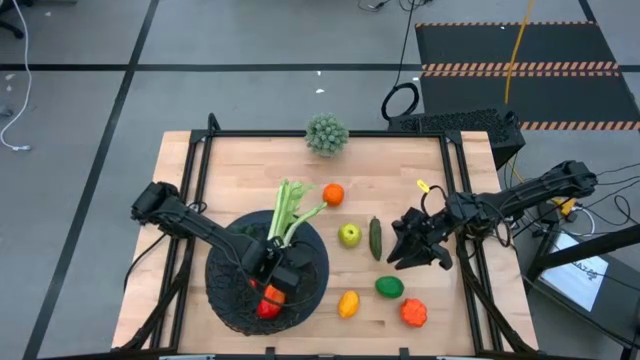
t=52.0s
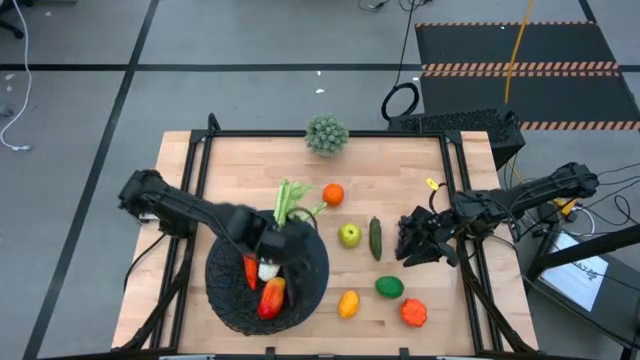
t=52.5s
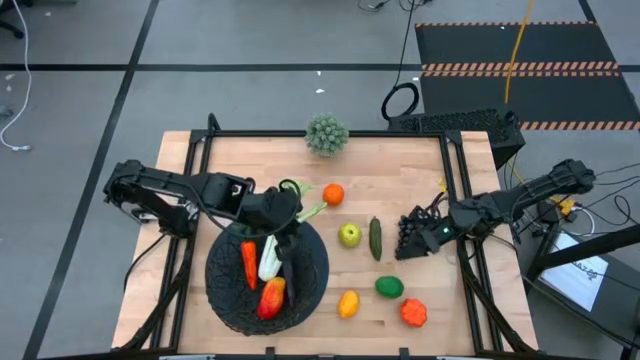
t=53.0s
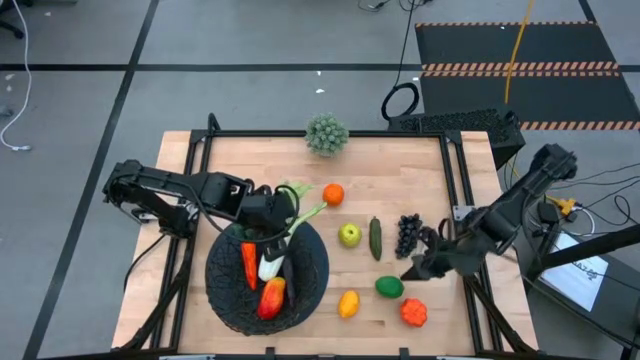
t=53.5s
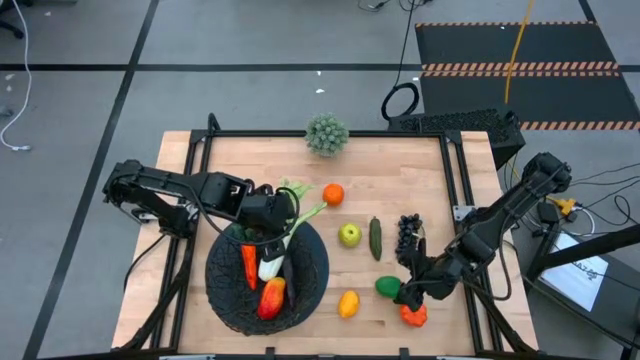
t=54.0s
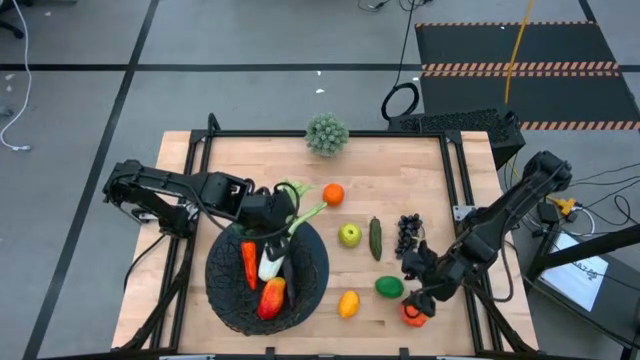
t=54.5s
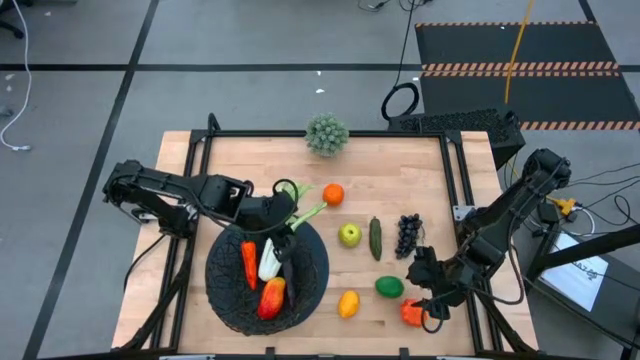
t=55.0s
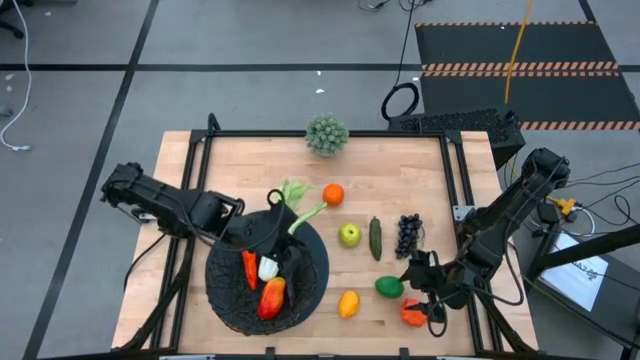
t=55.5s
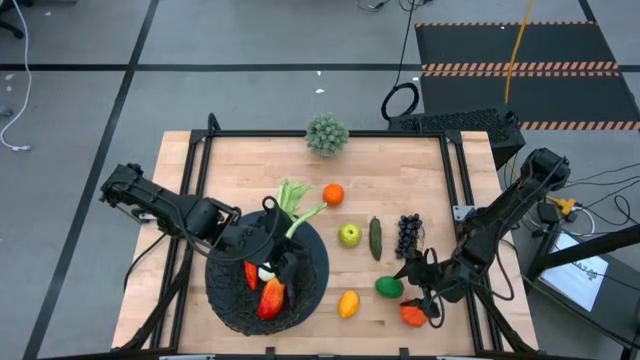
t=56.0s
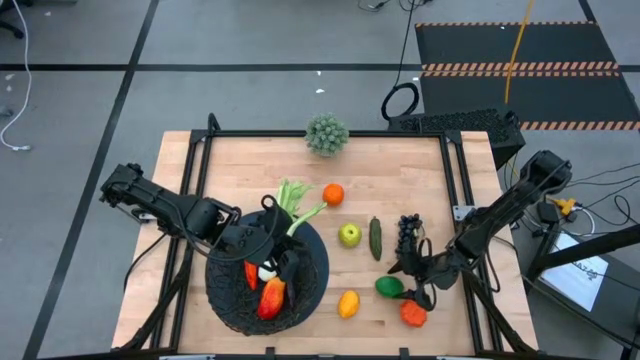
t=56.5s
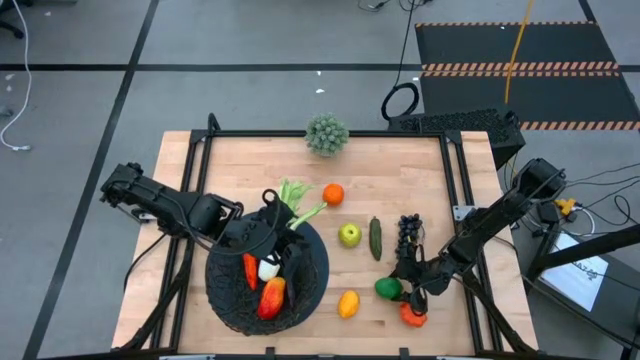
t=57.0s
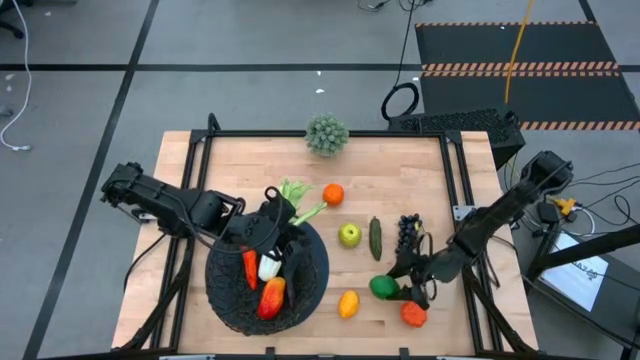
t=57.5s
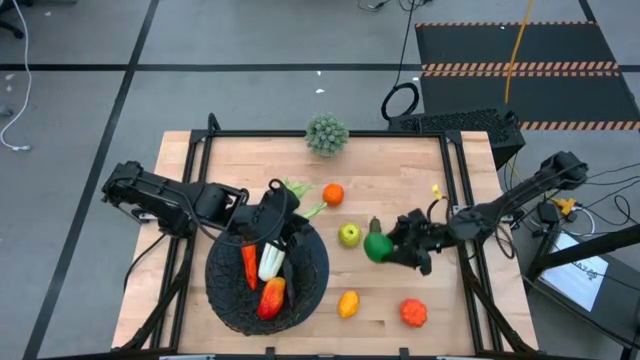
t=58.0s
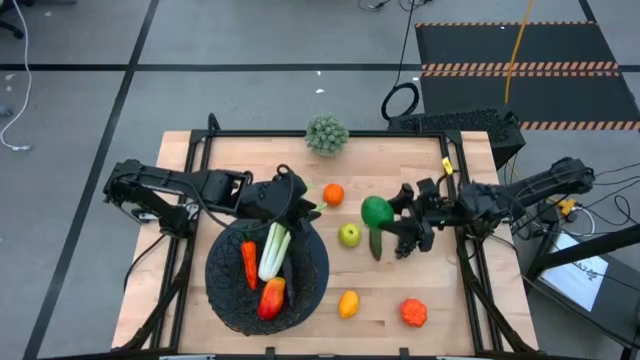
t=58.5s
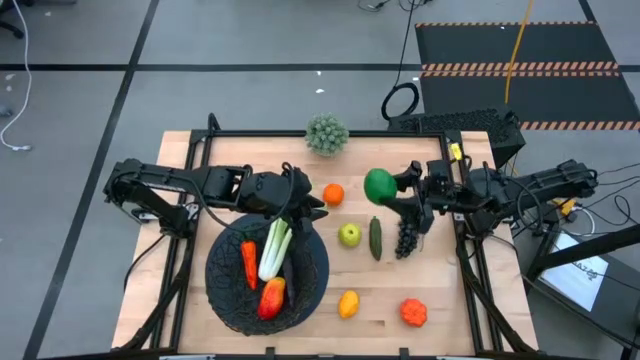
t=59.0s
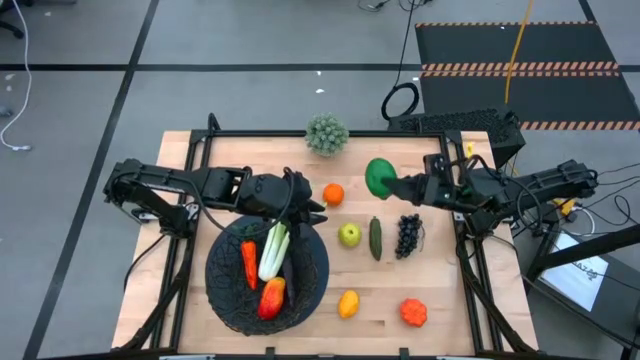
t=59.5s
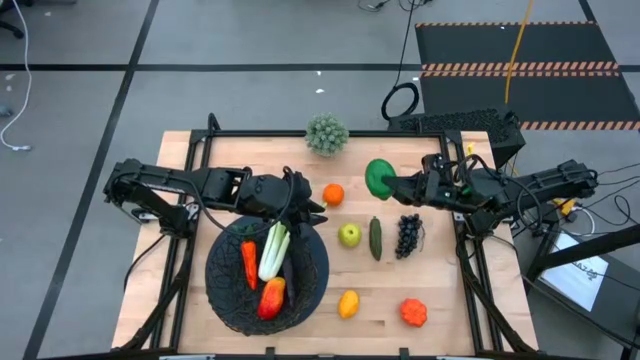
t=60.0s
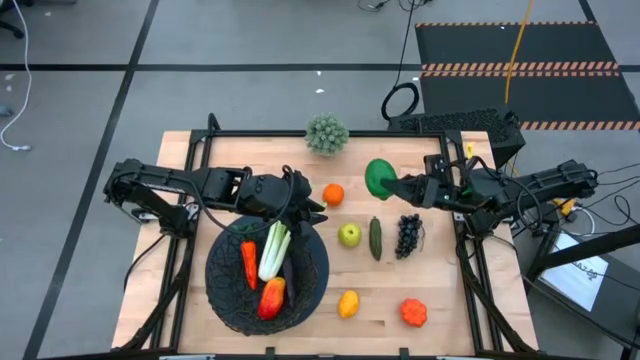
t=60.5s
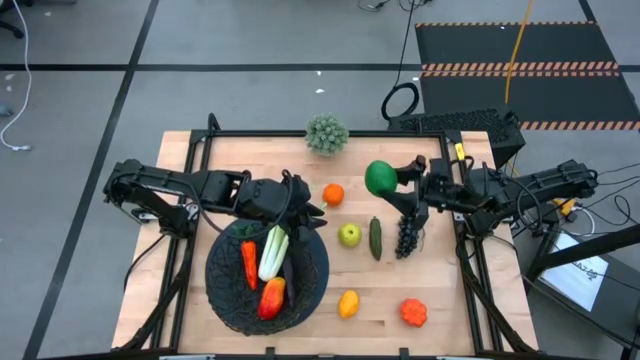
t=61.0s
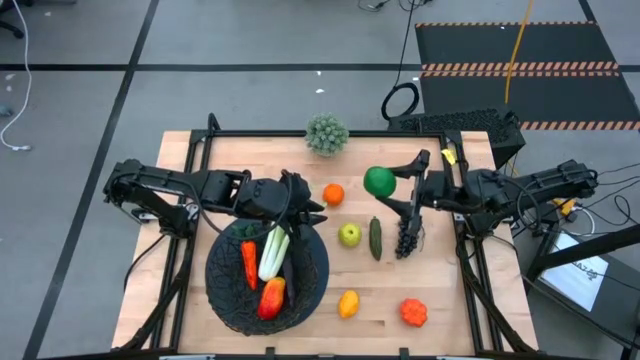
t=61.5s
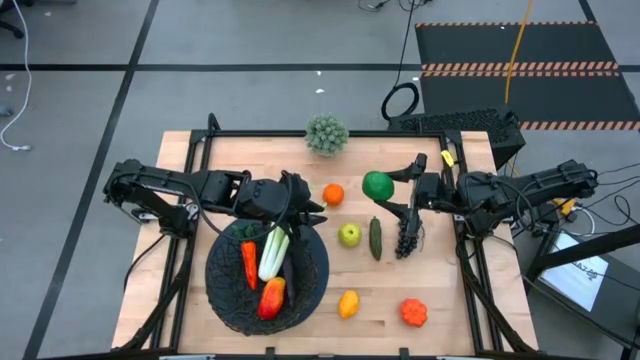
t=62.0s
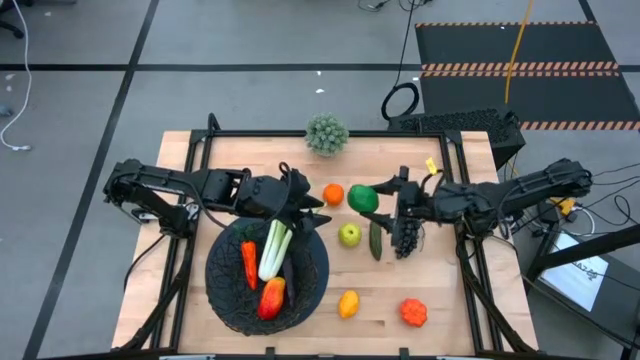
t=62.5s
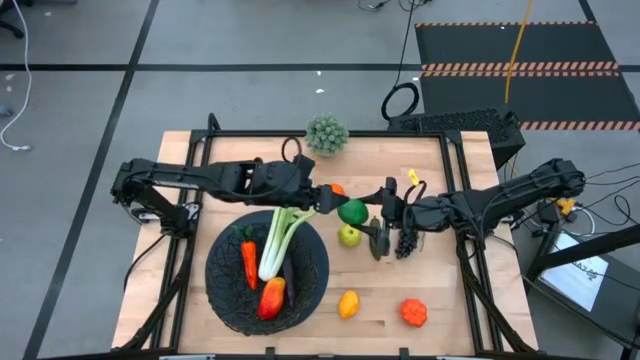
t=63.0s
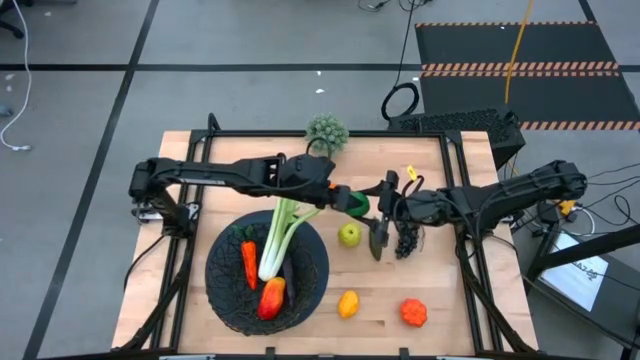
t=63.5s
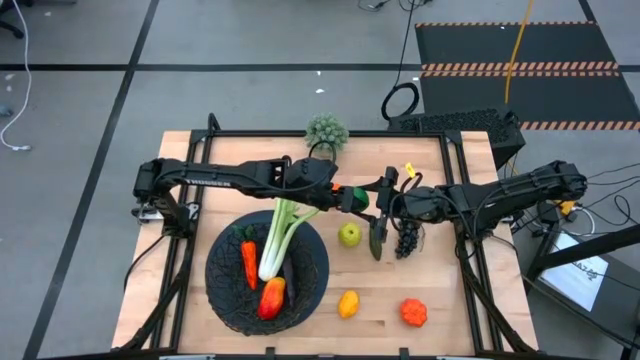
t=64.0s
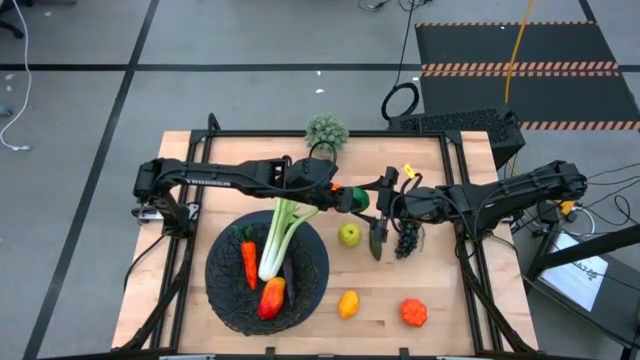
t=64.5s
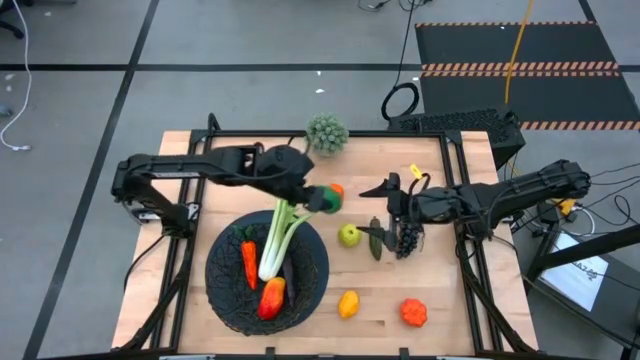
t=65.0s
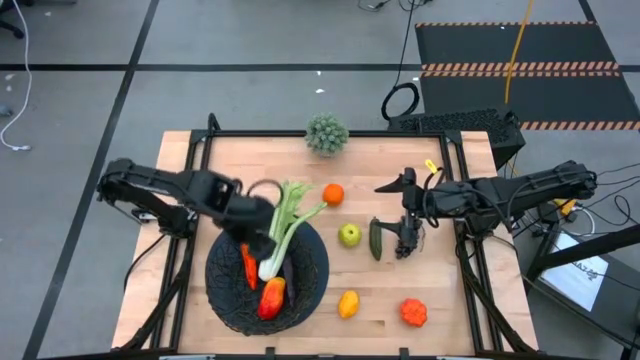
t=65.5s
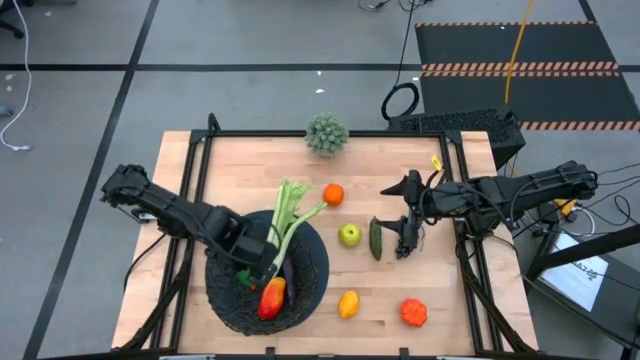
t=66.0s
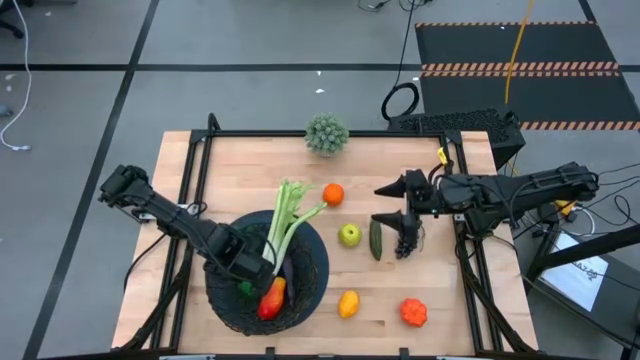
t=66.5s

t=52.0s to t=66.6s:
Task: Build produce basket
Put the green green lime into the black wire basket

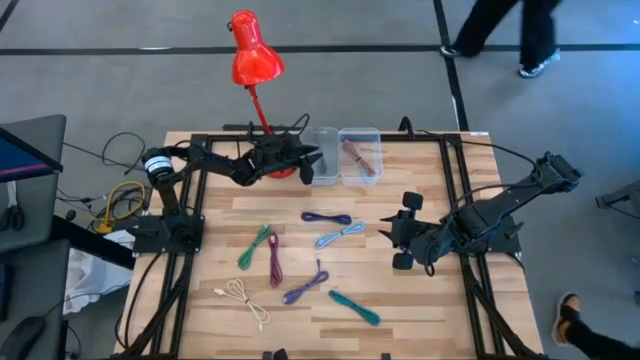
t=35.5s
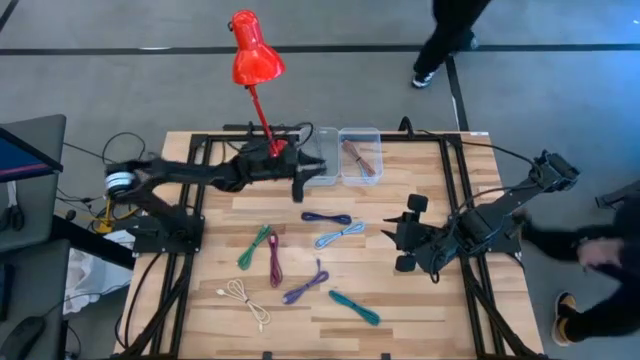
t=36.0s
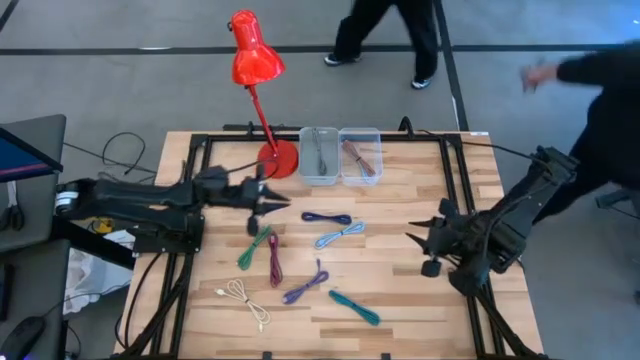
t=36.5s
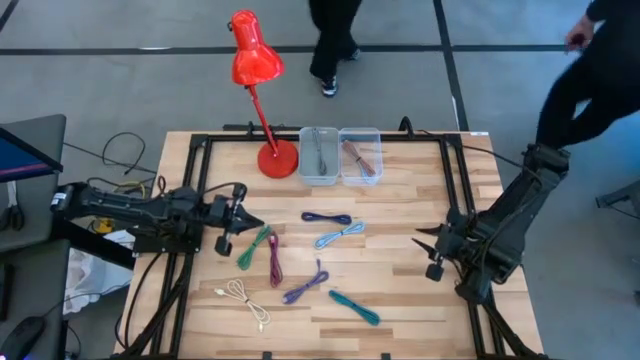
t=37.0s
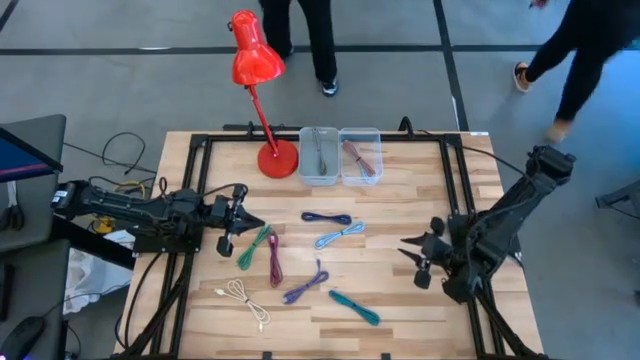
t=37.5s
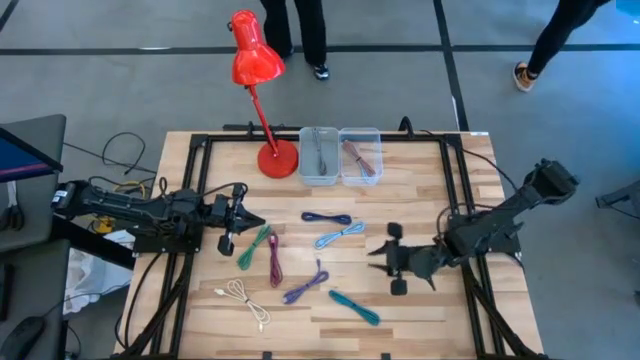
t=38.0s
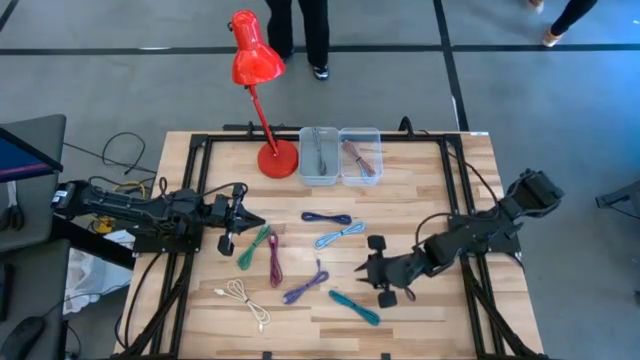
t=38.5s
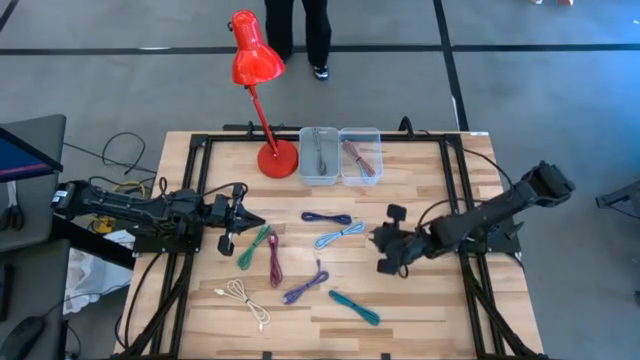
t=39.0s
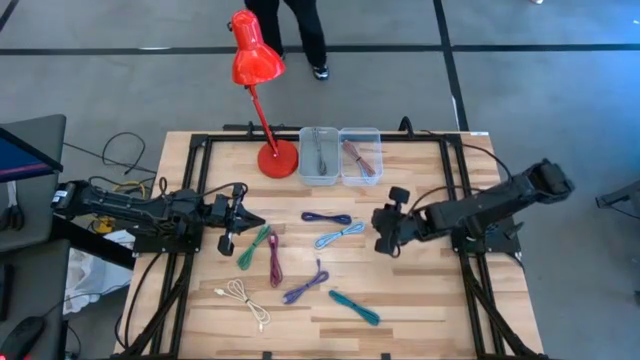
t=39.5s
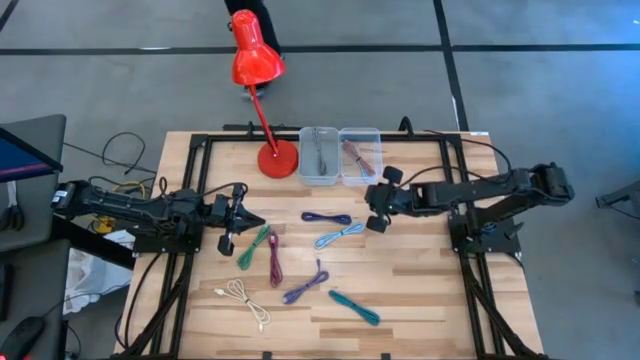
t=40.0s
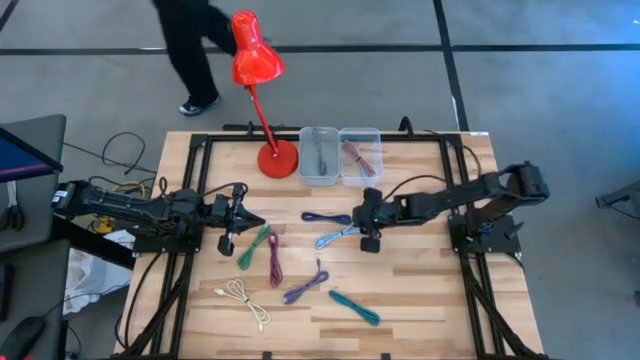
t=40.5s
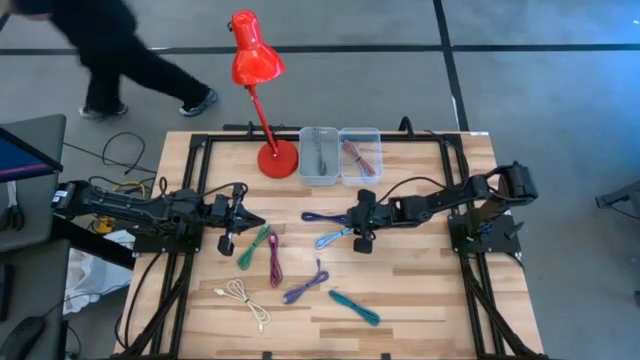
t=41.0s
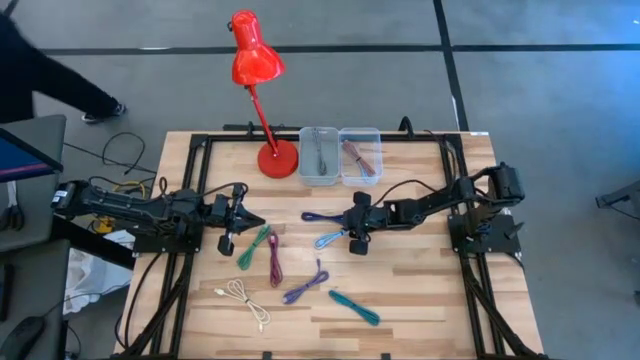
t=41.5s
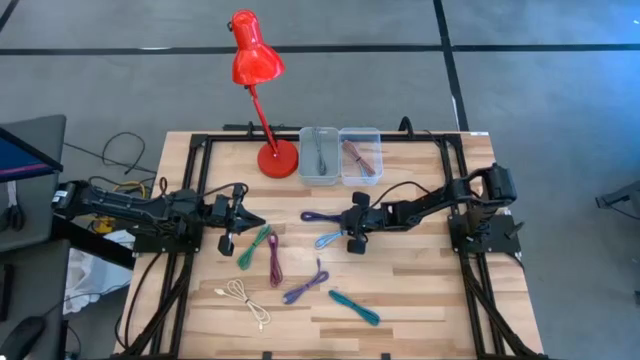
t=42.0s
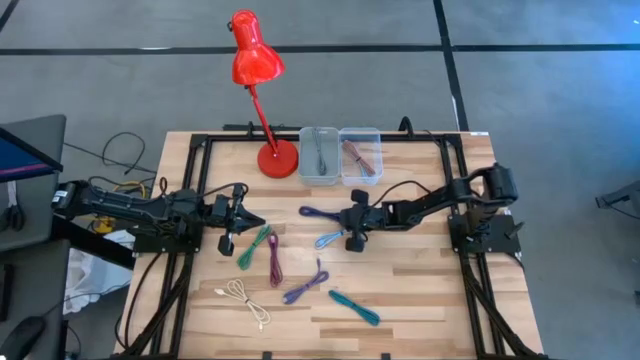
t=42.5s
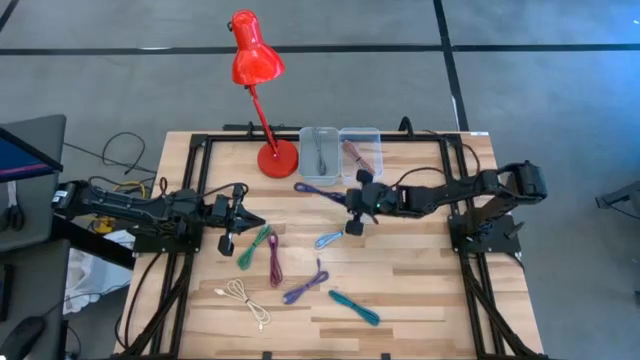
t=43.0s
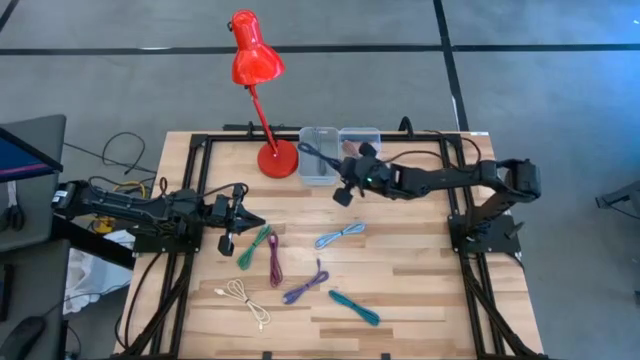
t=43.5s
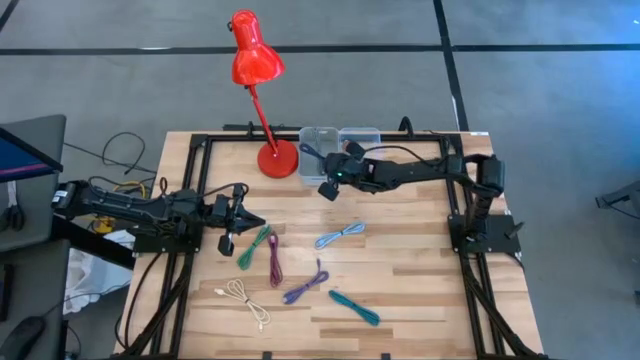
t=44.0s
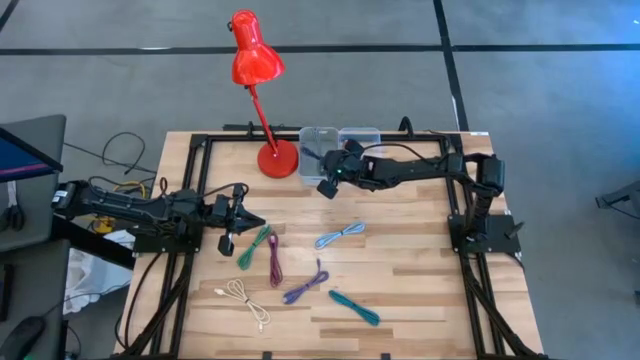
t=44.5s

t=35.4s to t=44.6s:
Task: Pick & Place USB Port
Put the black and violet charger cable into the gray bin
